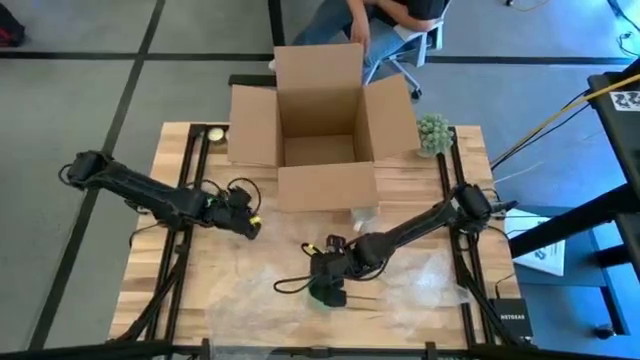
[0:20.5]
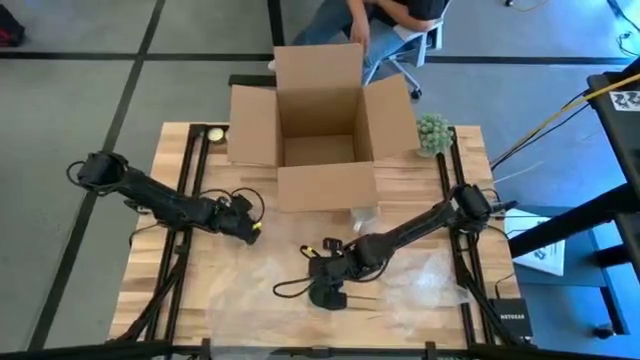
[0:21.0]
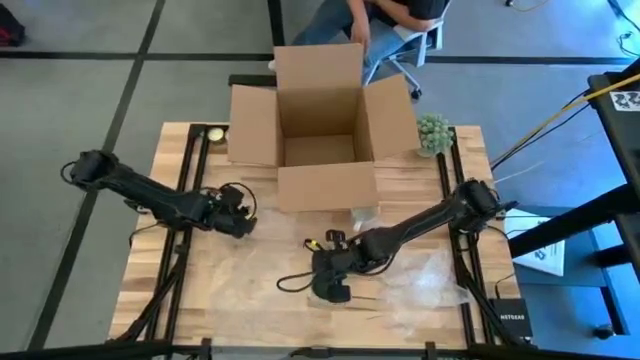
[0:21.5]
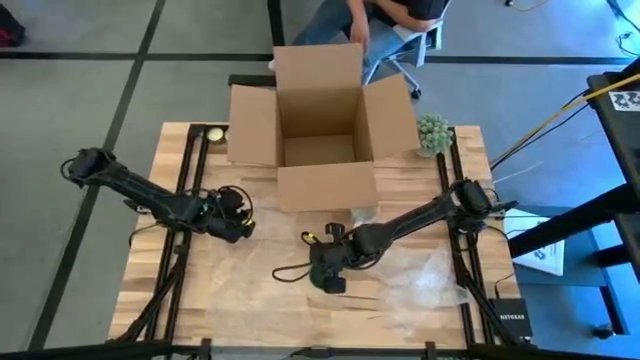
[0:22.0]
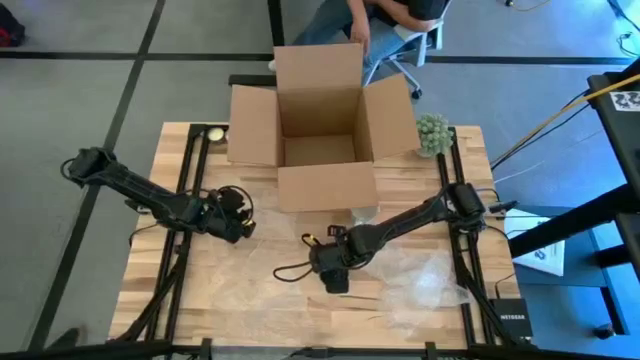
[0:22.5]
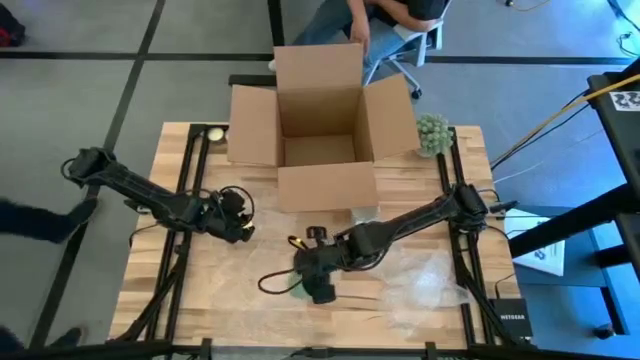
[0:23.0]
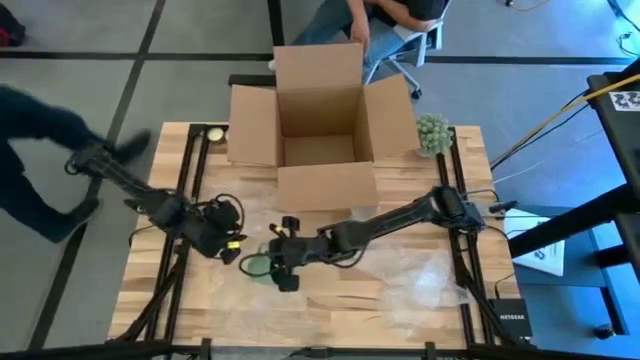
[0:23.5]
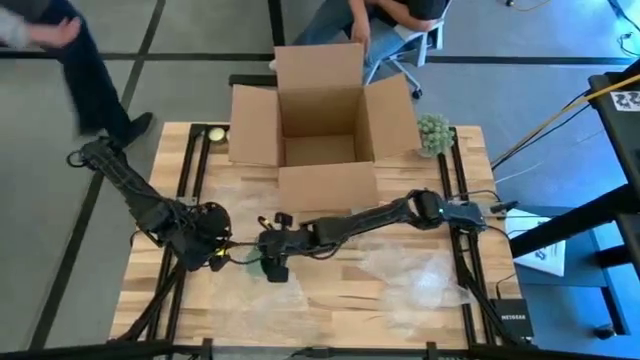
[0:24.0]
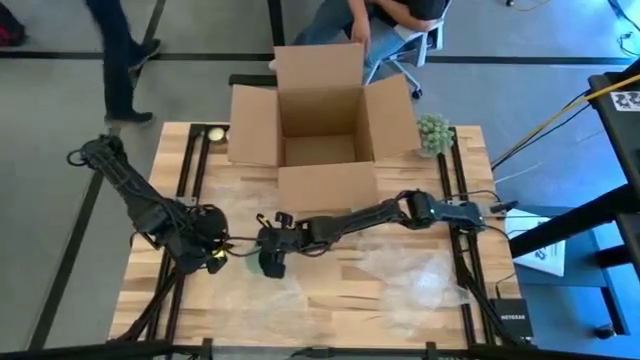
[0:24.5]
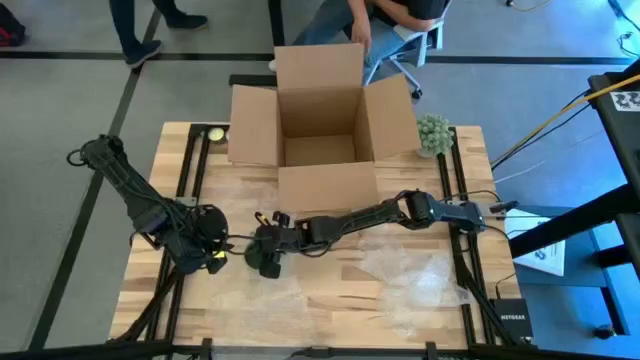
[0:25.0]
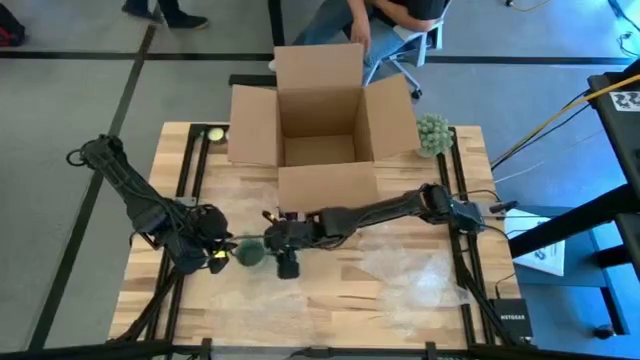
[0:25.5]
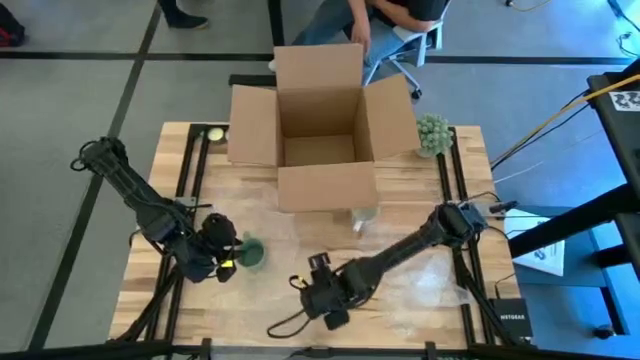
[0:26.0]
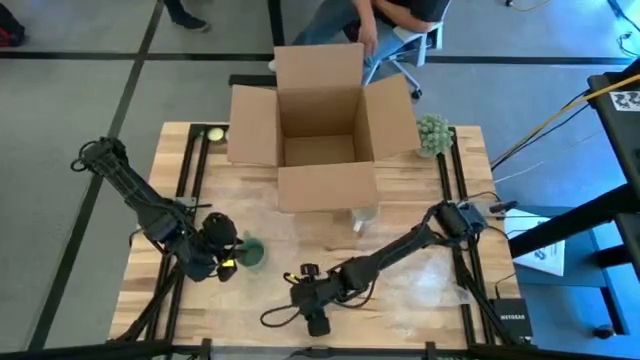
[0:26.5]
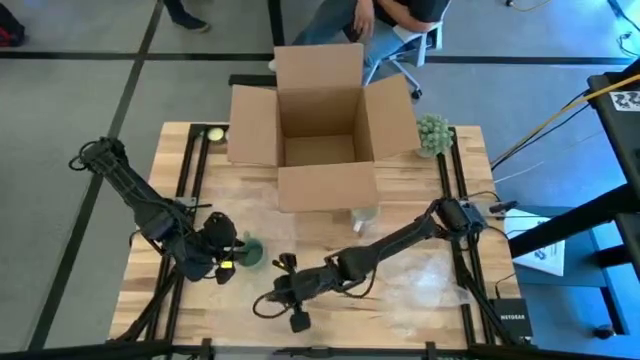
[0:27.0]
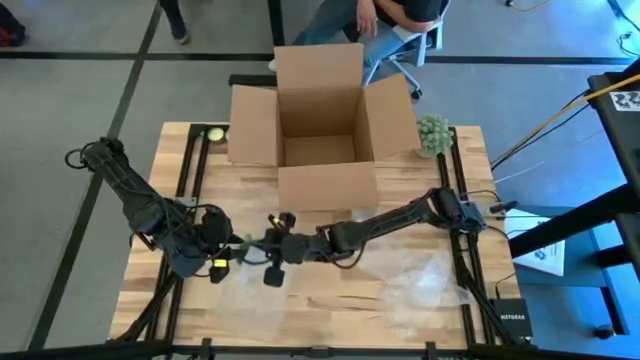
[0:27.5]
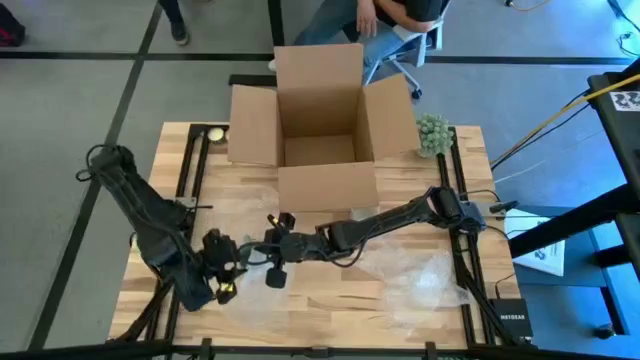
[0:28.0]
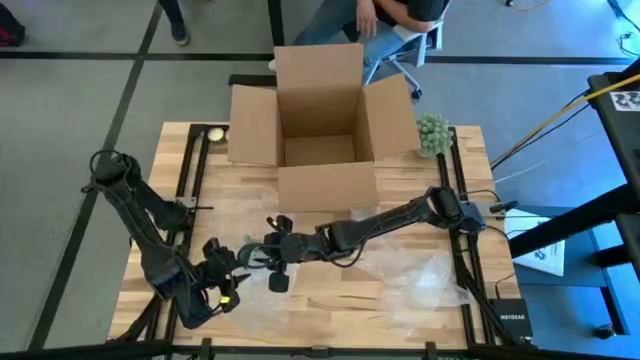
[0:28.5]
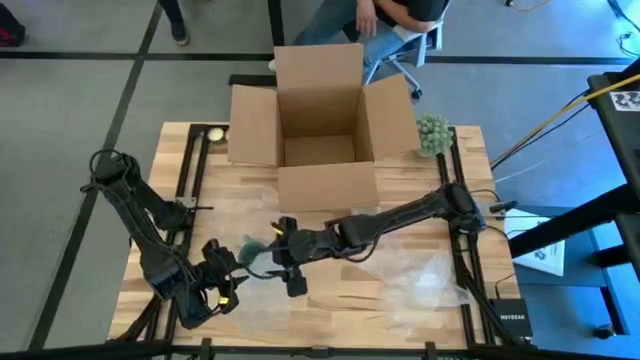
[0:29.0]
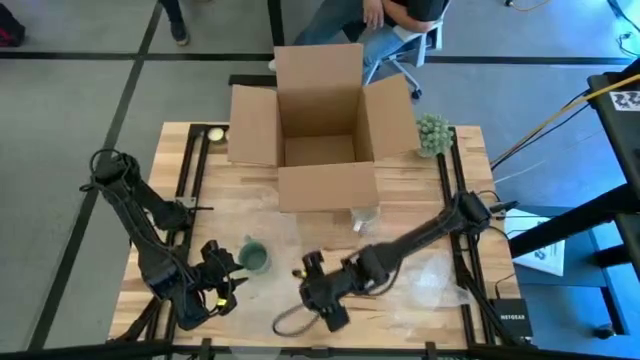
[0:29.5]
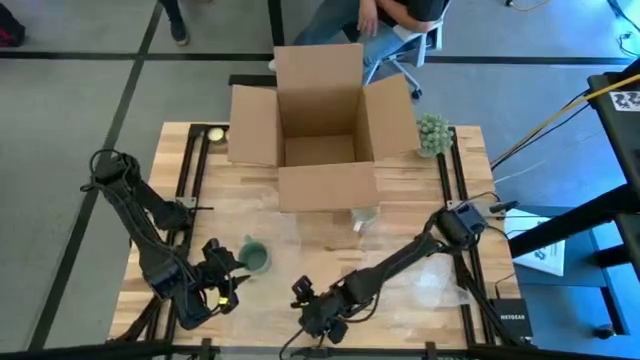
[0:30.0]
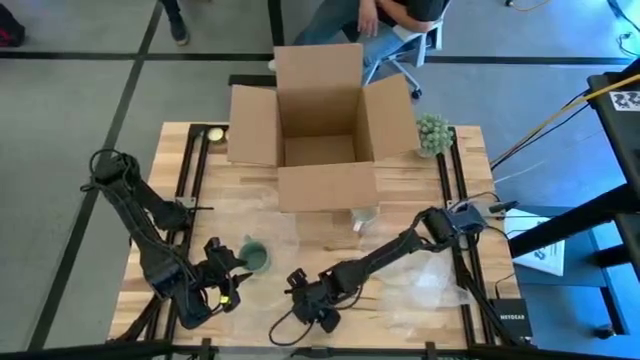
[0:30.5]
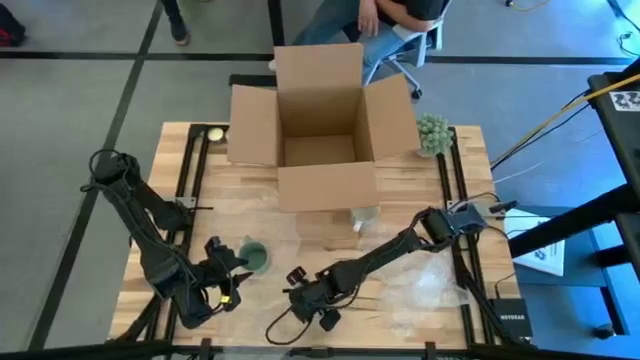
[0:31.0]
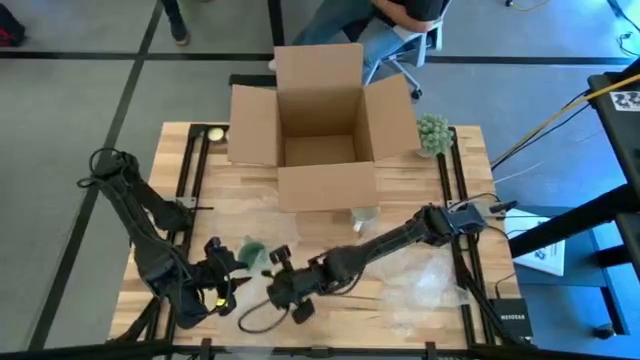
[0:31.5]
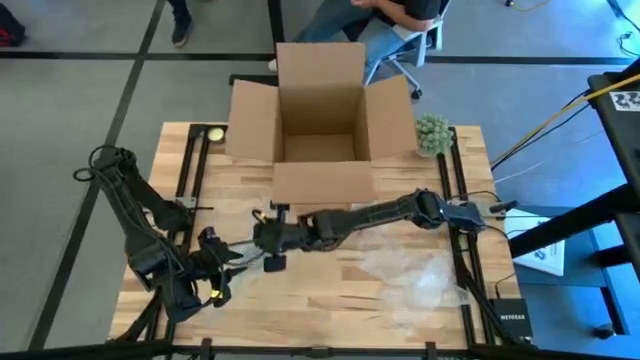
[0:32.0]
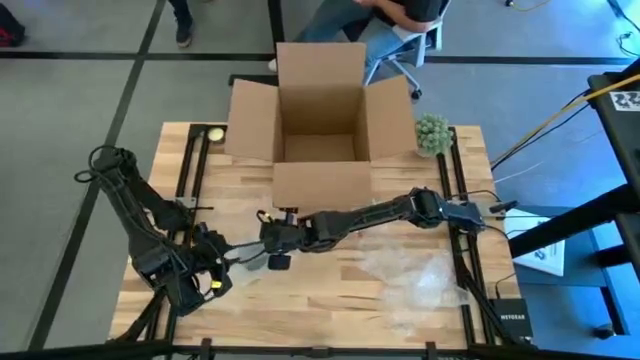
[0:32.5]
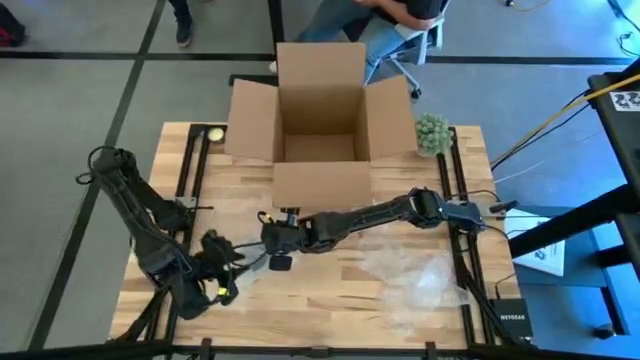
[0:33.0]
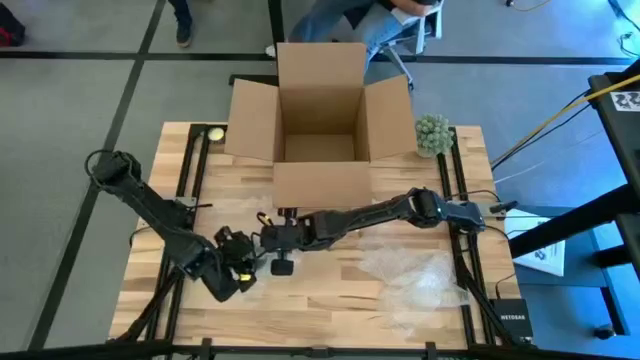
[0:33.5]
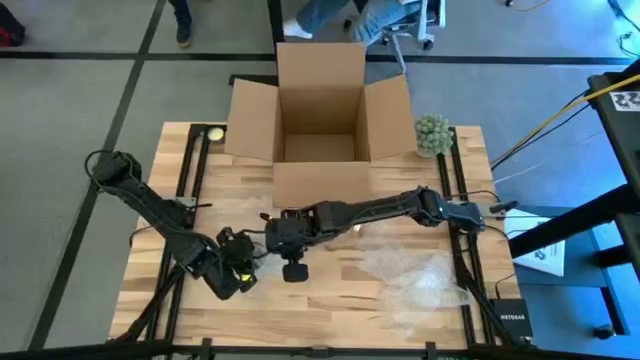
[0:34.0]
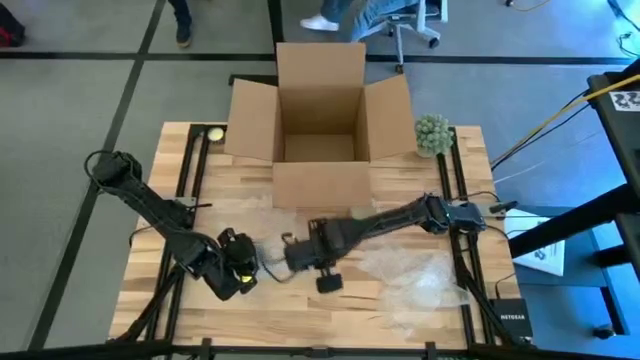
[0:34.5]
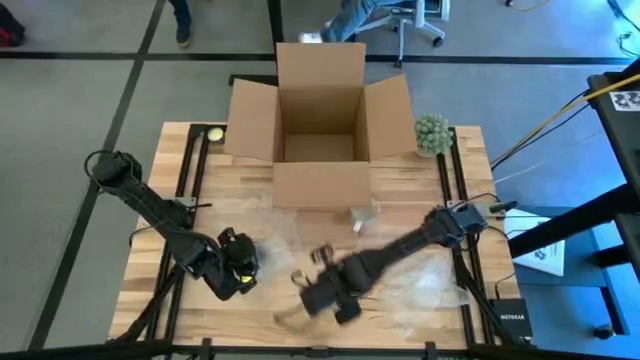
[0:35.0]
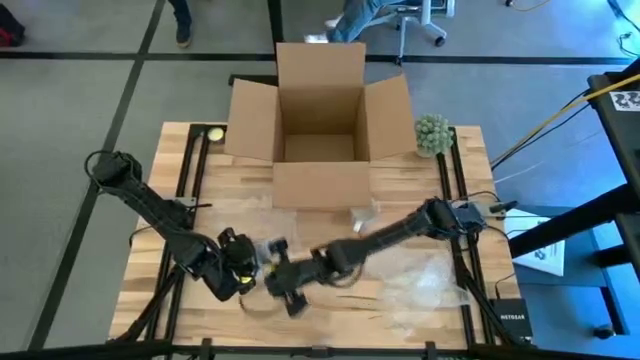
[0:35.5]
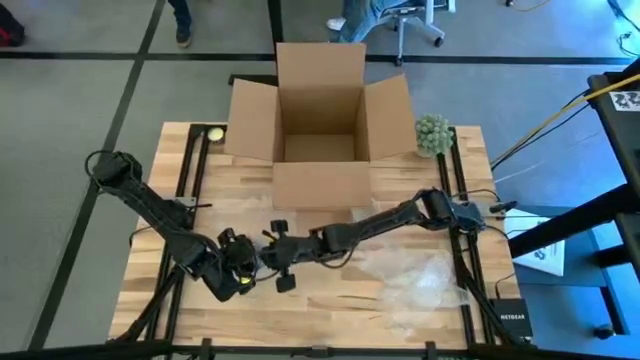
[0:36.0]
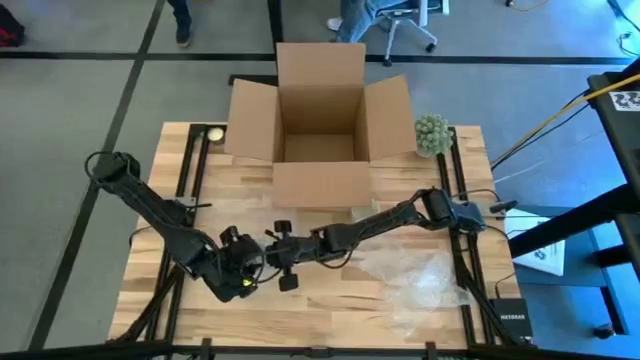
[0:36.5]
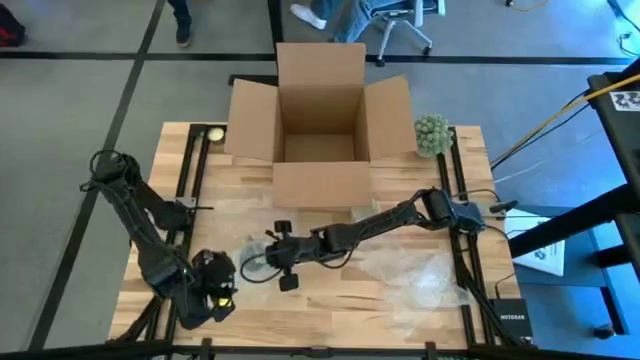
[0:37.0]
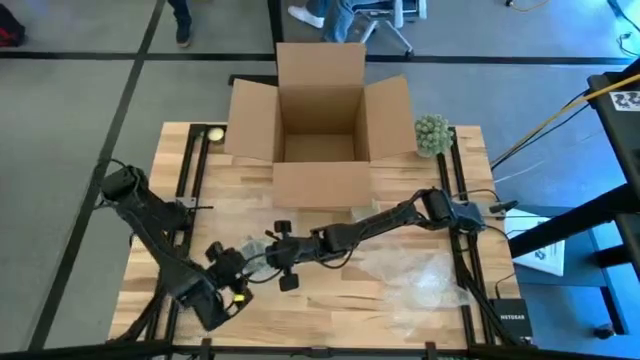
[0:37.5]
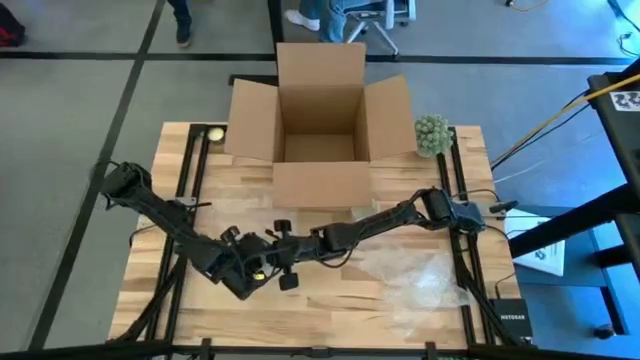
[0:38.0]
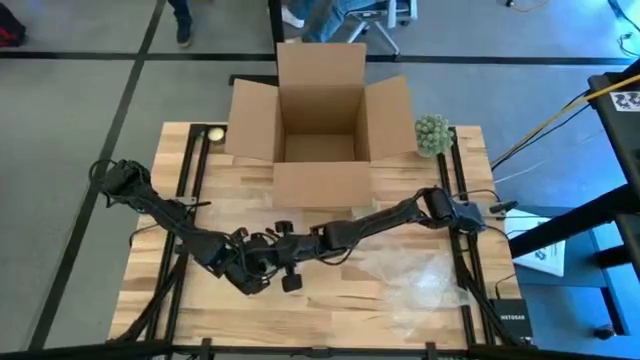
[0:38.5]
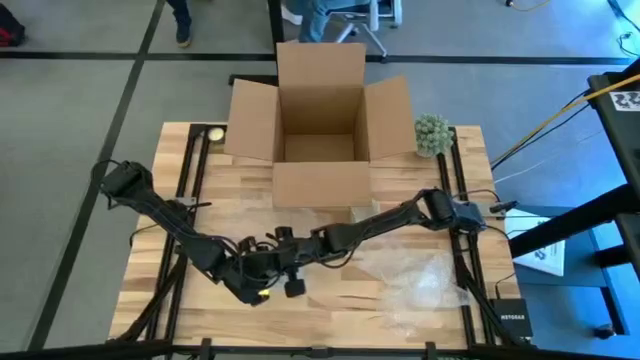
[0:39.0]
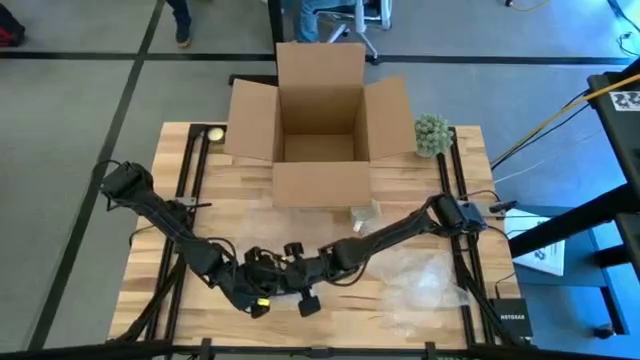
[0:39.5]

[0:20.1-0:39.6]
Task: wrap mug
Wrap the green mug with bubble wrap
